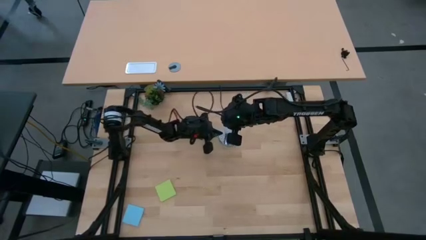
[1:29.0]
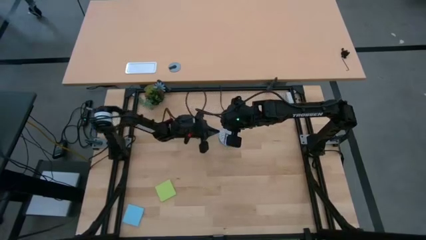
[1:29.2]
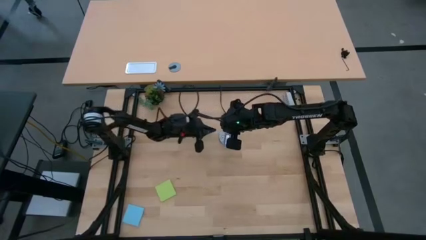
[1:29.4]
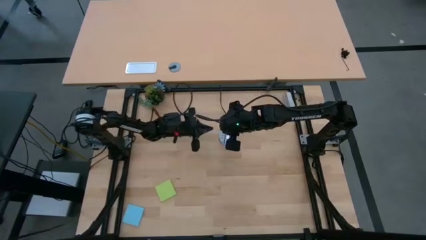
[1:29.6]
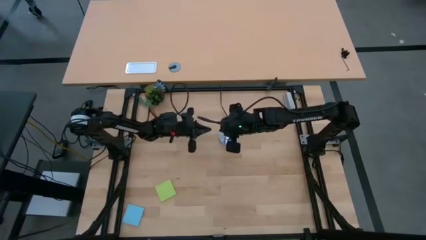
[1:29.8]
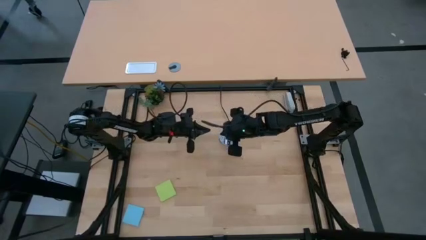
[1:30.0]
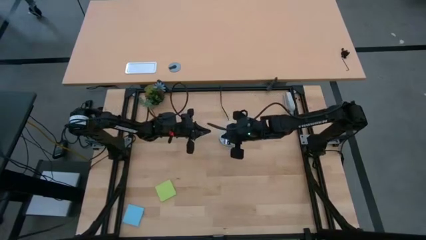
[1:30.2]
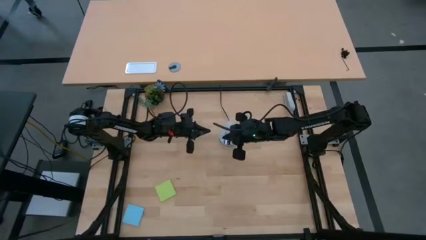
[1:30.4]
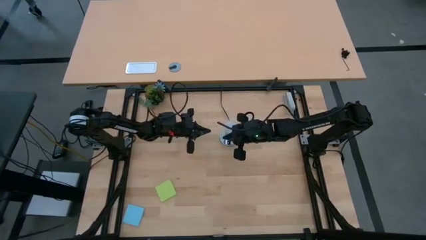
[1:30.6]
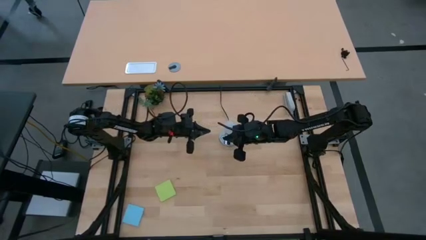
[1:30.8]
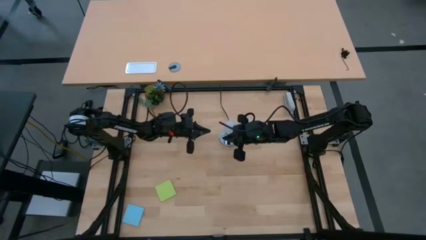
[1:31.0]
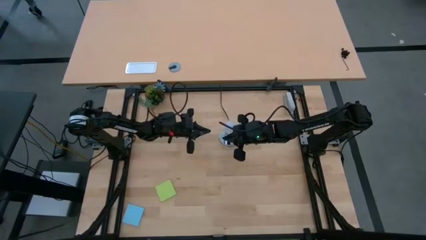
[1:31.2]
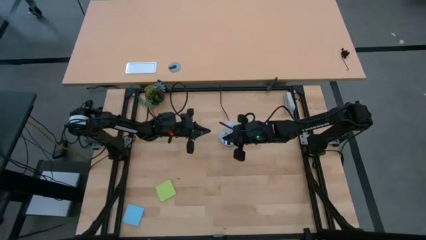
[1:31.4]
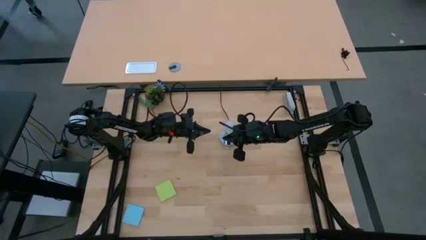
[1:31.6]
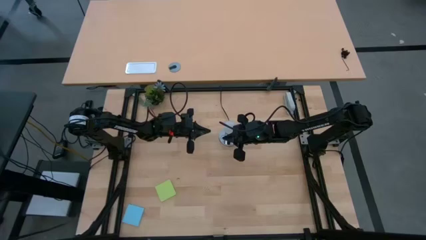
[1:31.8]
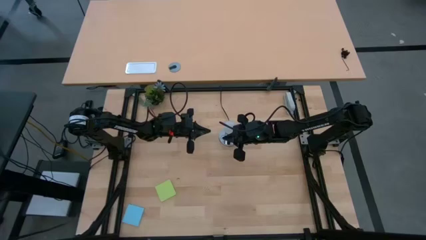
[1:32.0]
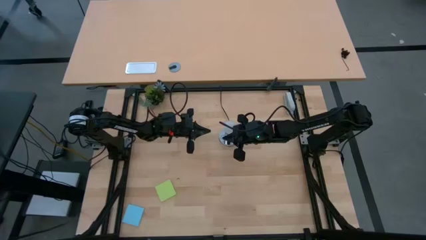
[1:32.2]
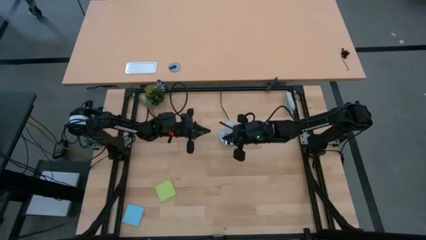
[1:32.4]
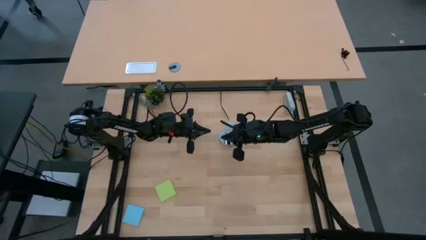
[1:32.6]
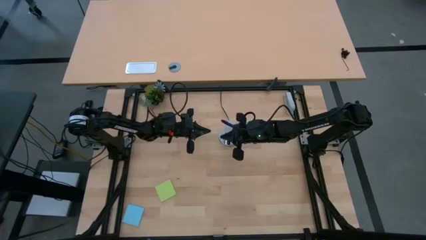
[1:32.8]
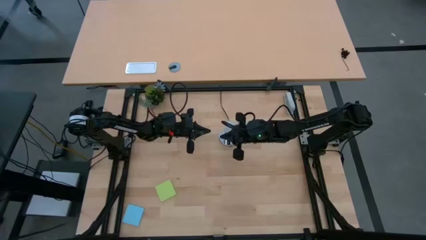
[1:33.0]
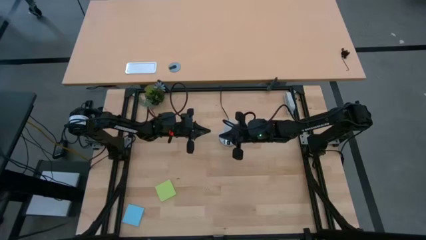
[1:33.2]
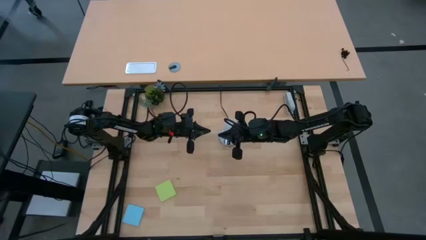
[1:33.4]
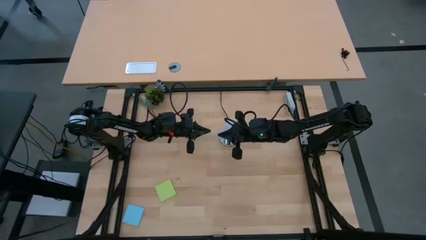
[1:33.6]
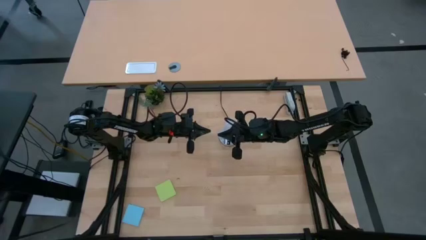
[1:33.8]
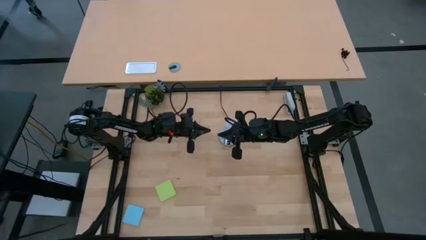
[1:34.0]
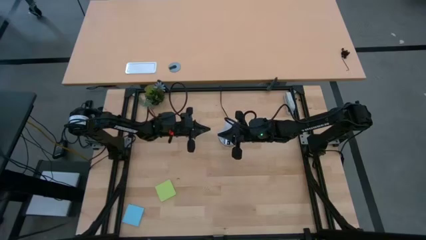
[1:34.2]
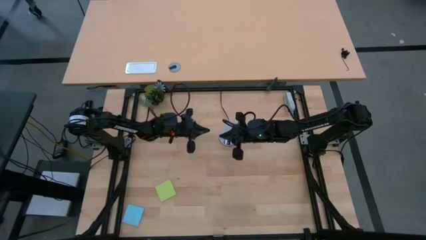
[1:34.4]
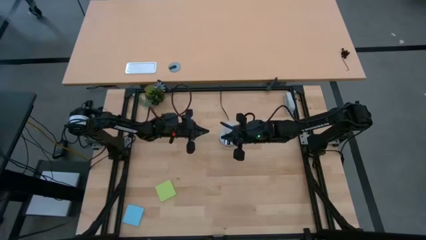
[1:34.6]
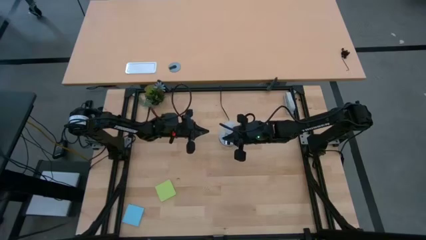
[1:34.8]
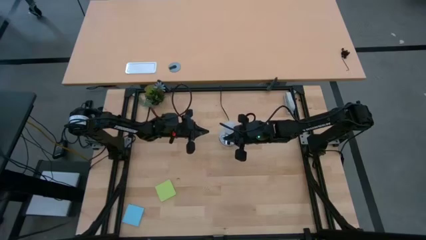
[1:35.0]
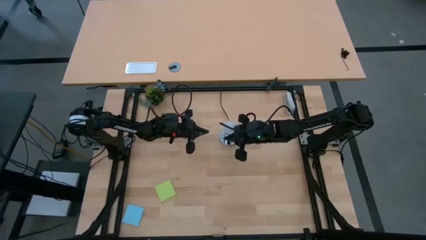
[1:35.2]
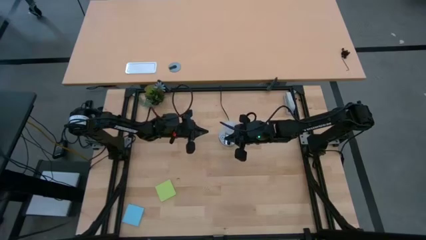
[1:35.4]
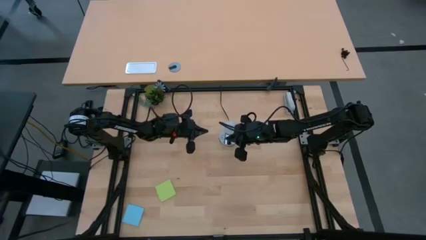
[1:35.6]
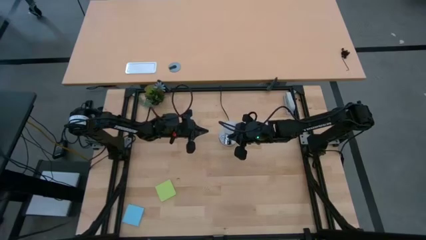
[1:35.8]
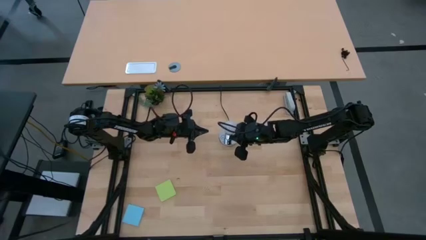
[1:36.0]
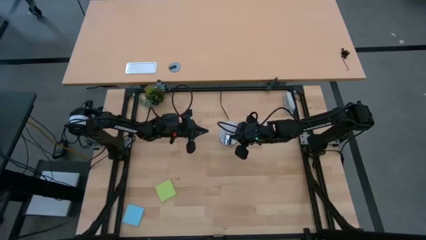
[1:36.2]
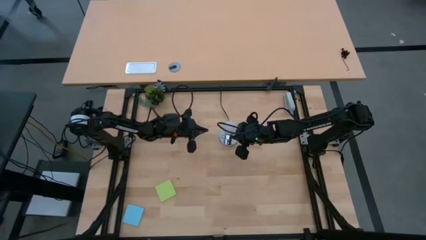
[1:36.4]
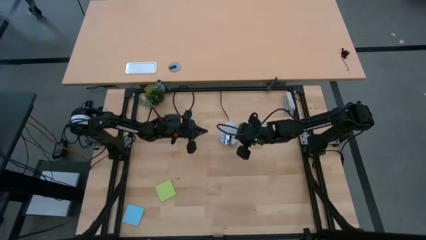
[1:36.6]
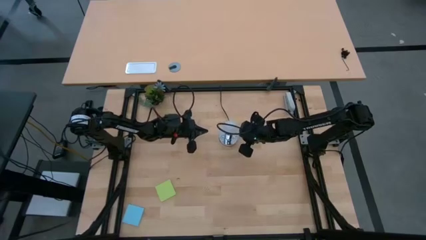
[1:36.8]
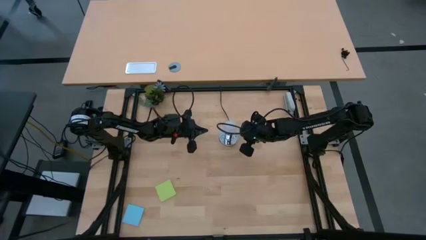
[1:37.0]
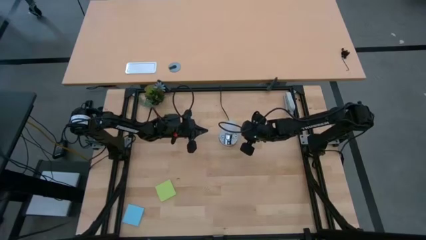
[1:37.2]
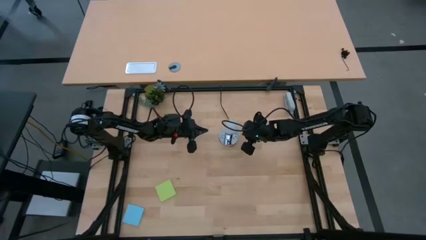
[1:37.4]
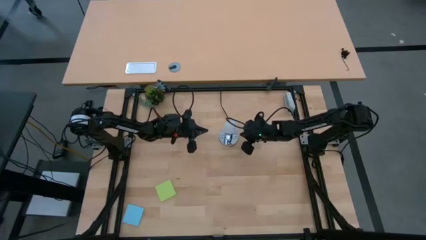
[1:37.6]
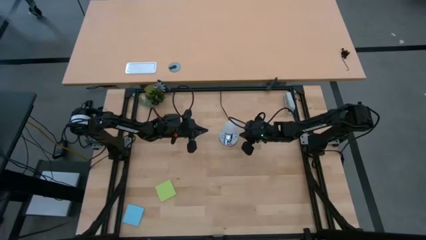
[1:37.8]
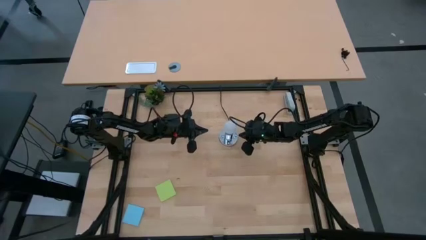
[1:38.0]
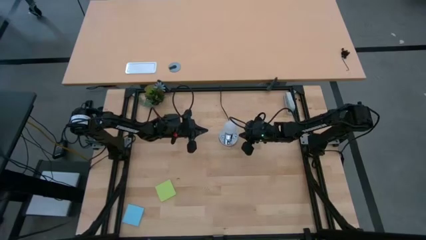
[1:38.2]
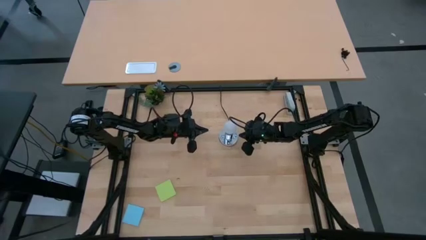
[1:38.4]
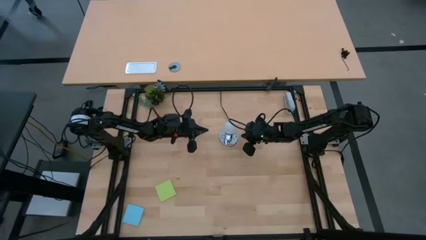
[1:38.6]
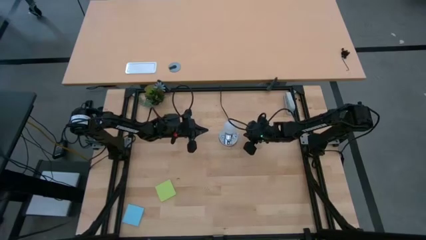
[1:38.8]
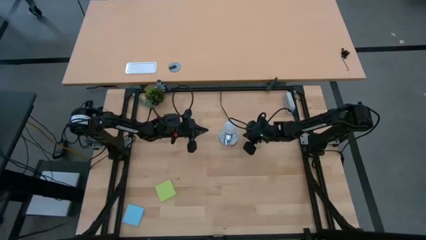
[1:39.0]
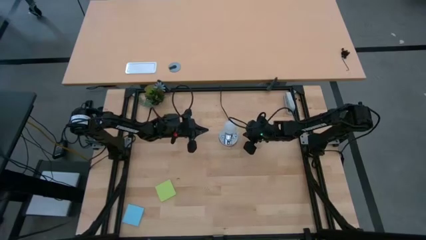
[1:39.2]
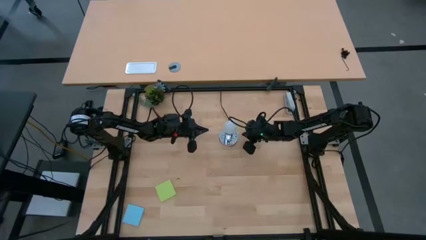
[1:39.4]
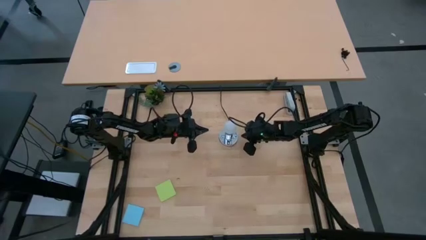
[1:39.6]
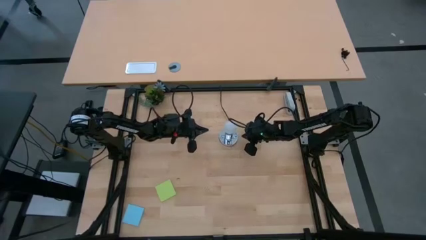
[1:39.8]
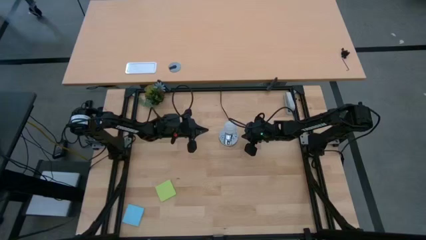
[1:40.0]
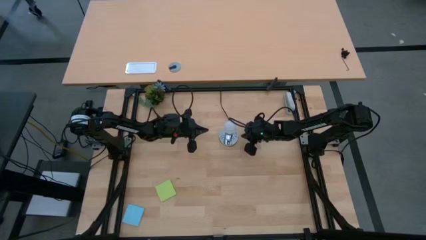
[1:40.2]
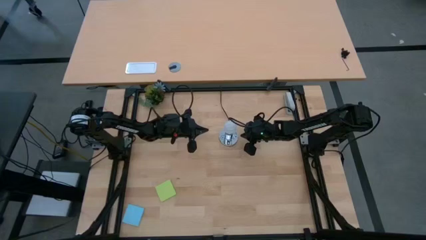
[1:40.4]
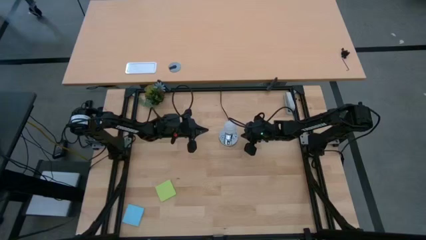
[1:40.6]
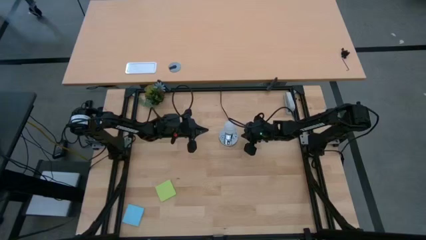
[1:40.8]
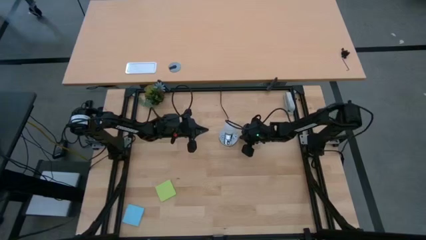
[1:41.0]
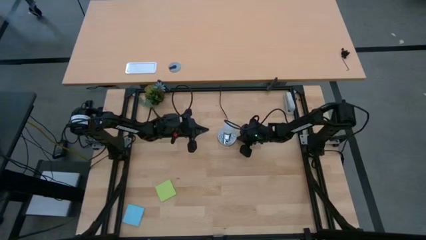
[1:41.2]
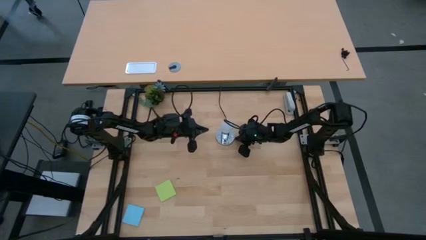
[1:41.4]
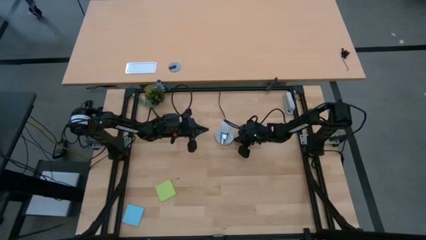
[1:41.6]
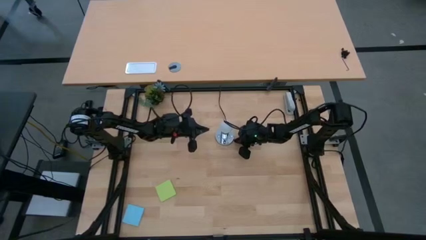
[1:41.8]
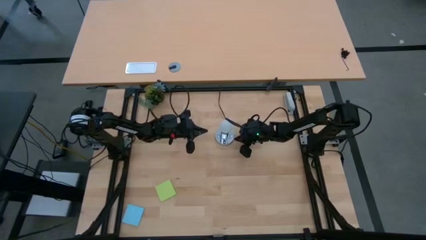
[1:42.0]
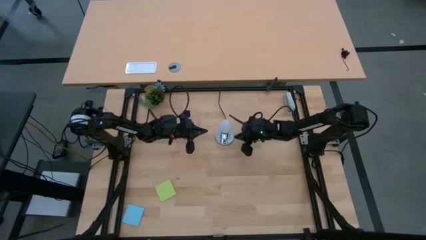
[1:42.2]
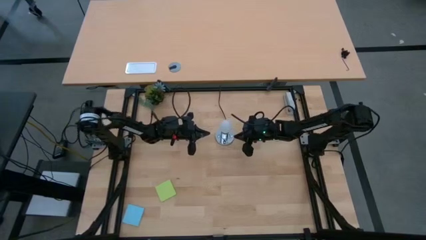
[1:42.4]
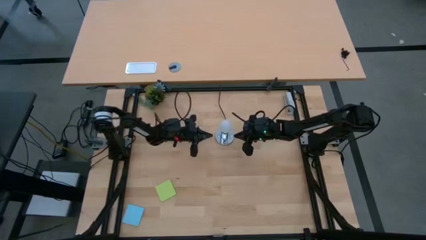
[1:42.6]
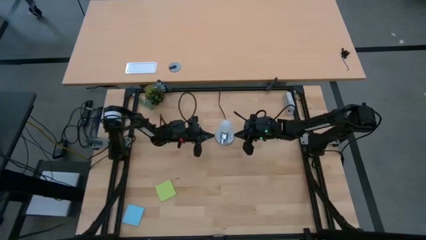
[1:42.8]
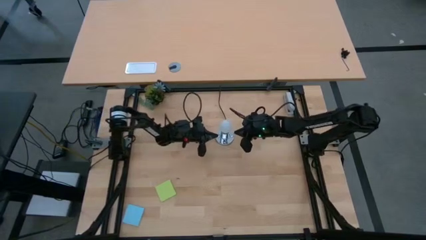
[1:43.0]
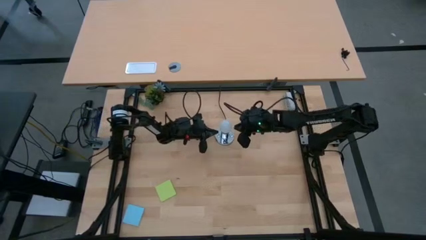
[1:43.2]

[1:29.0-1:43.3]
Task: Screw lightbulb
Remove the lightbulb from the lamp

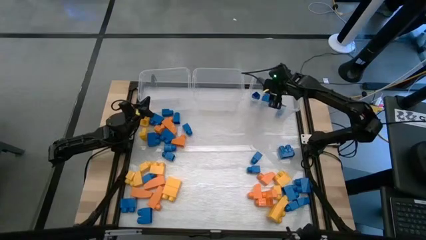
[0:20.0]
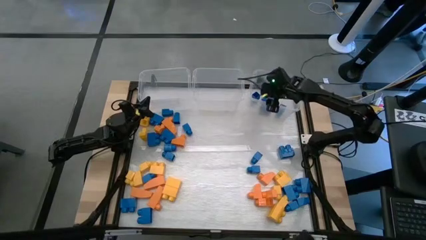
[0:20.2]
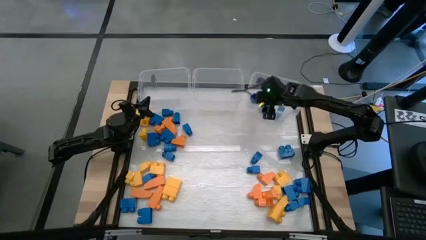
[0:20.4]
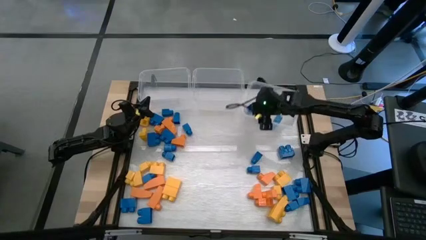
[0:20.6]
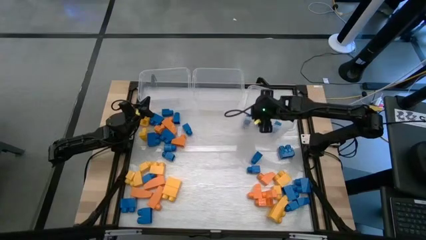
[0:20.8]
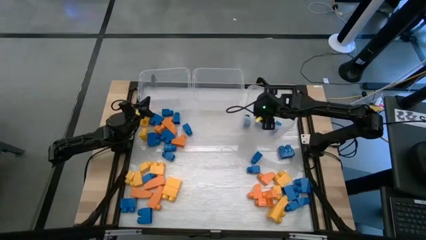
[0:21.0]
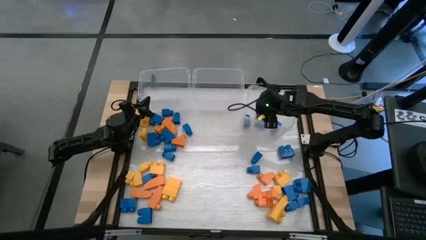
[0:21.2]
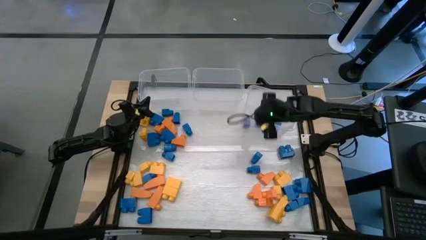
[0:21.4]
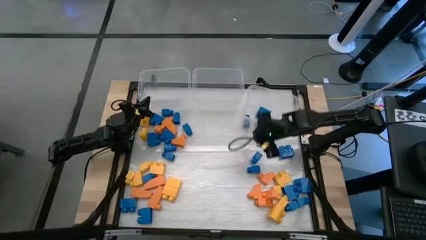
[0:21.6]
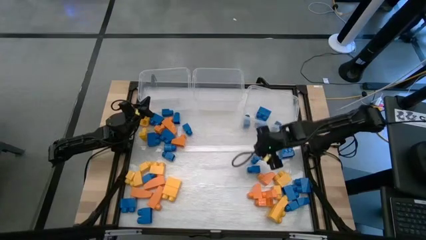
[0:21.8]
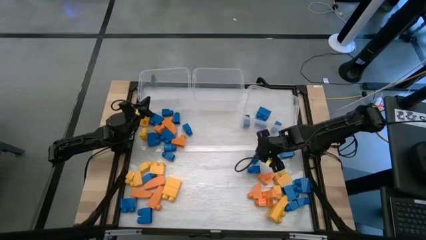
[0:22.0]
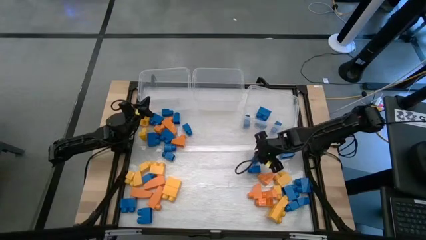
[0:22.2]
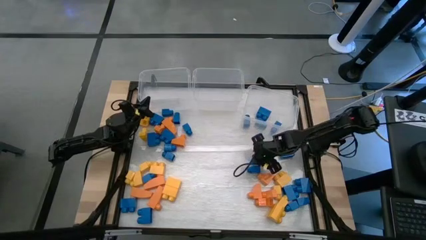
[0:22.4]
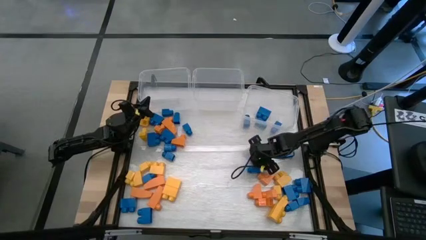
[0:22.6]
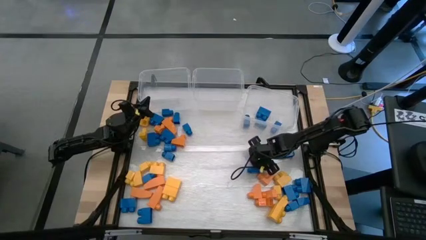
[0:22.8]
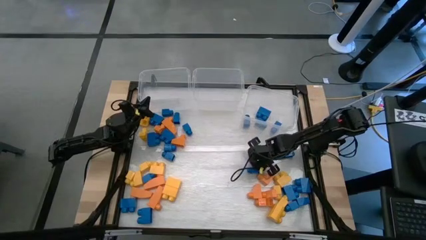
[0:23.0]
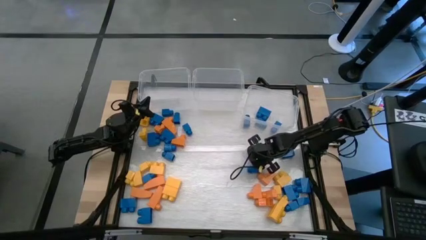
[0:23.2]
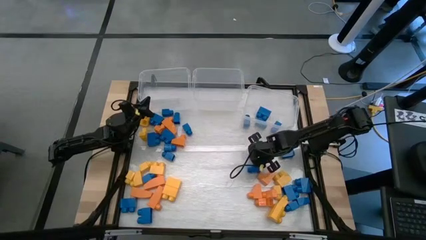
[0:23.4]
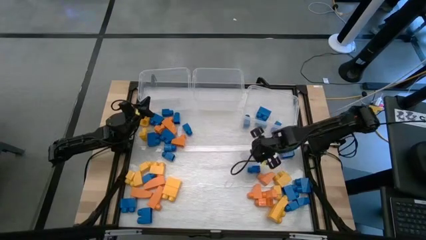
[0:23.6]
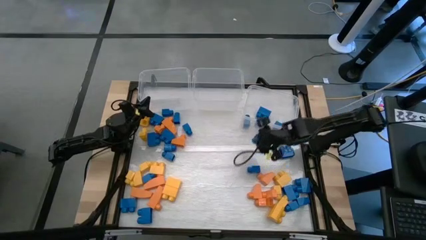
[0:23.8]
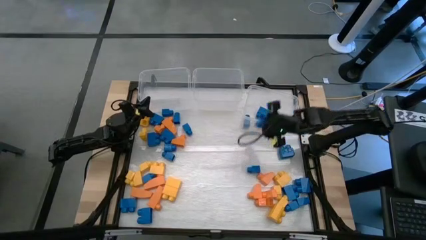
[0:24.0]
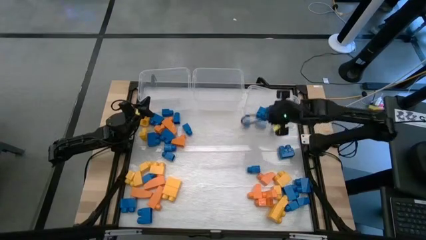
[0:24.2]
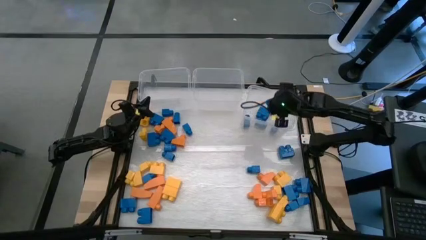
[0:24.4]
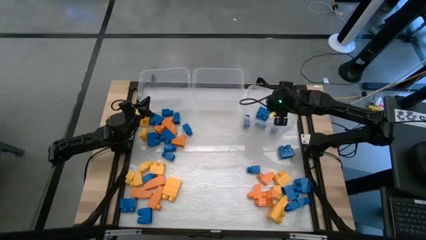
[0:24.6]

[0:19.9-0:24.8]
Task: Sort blocks
Put the blue game piece into the right transparent bin
